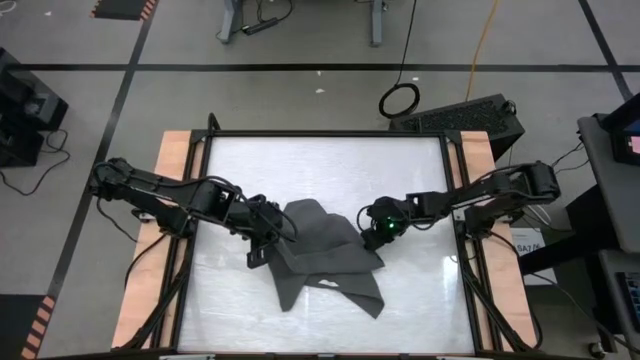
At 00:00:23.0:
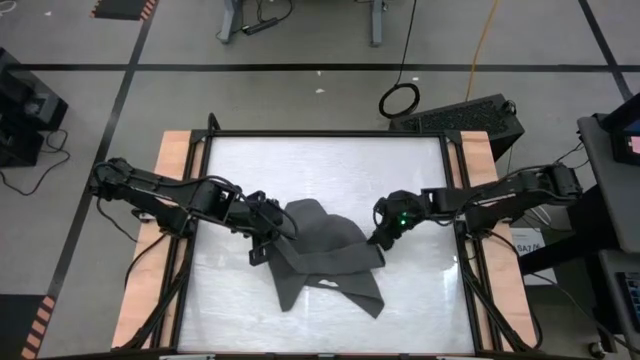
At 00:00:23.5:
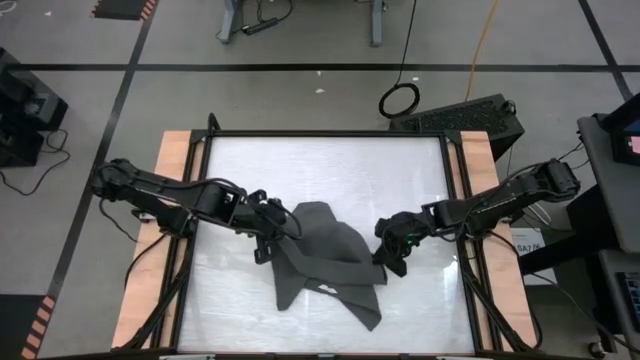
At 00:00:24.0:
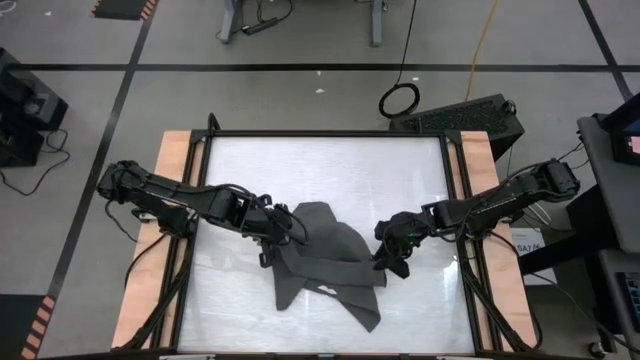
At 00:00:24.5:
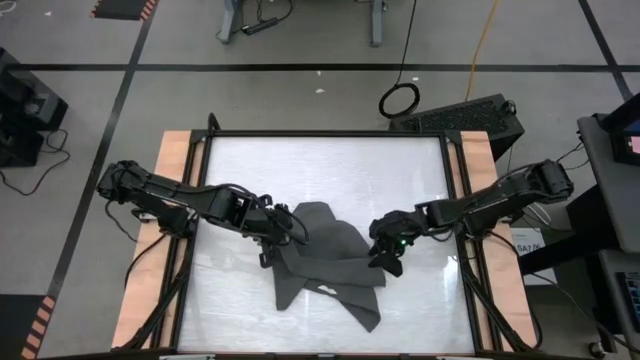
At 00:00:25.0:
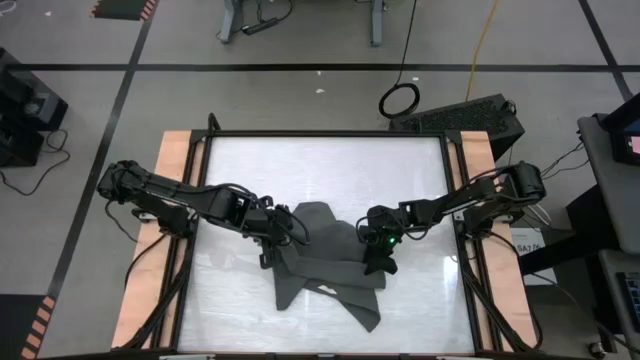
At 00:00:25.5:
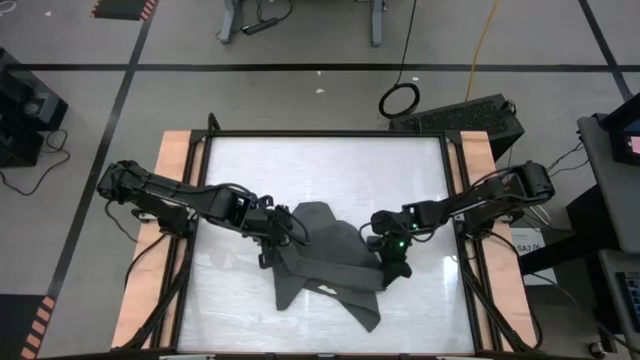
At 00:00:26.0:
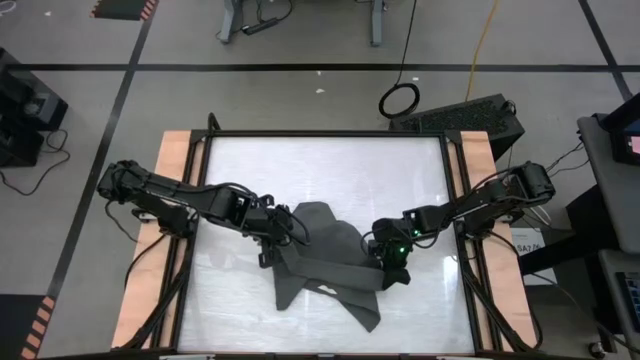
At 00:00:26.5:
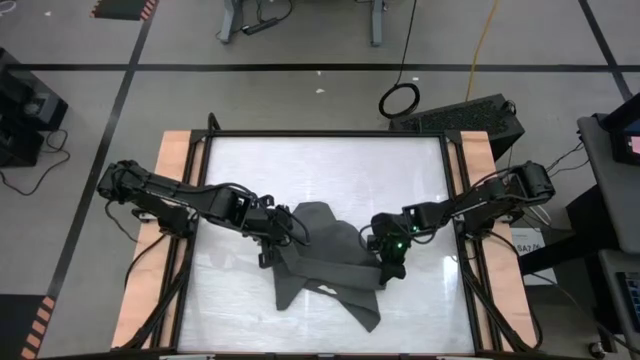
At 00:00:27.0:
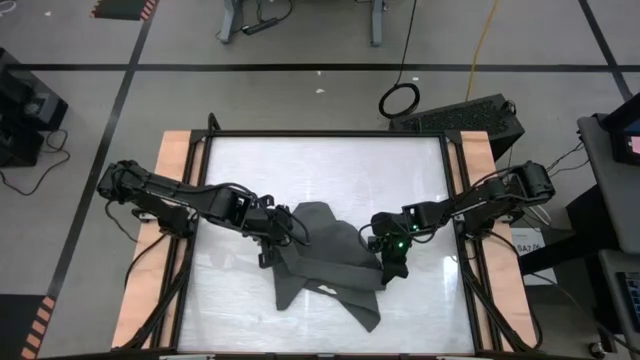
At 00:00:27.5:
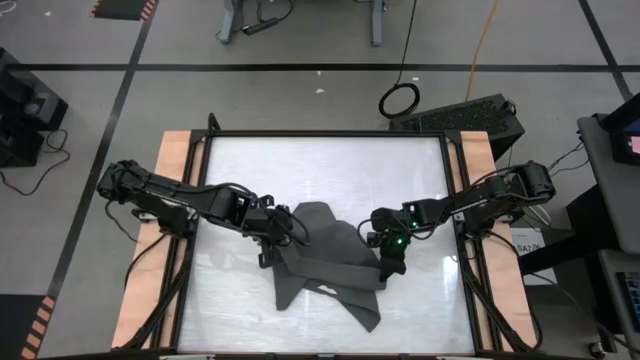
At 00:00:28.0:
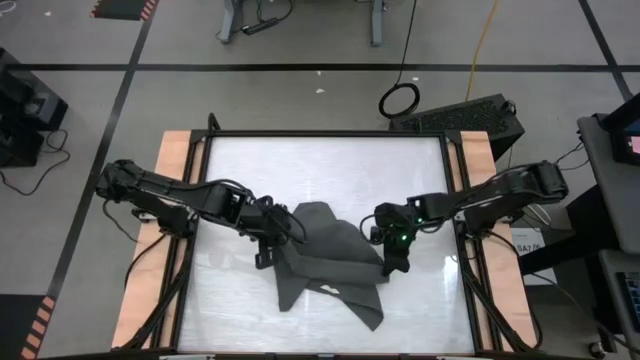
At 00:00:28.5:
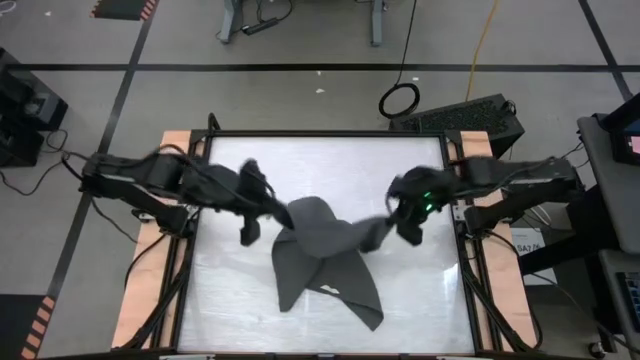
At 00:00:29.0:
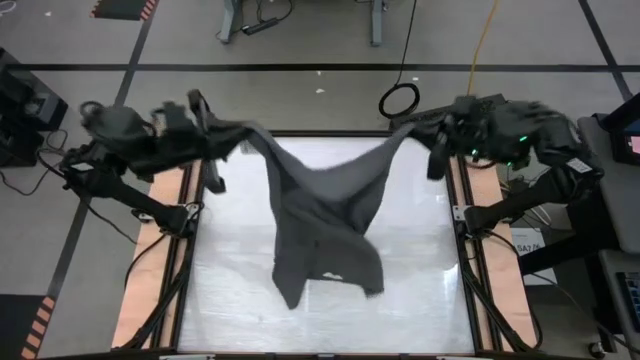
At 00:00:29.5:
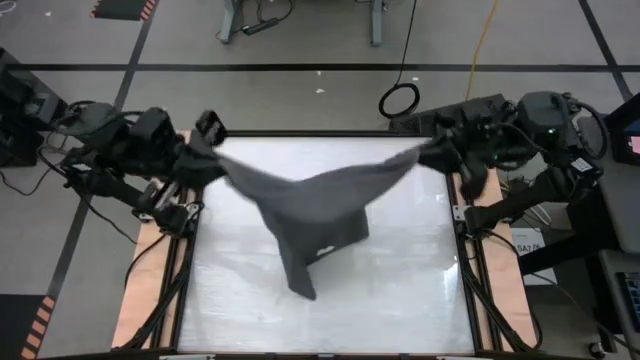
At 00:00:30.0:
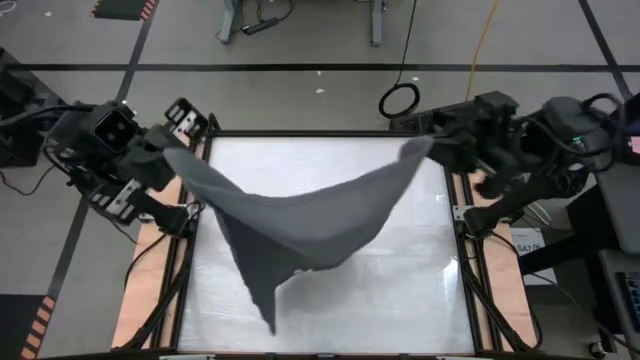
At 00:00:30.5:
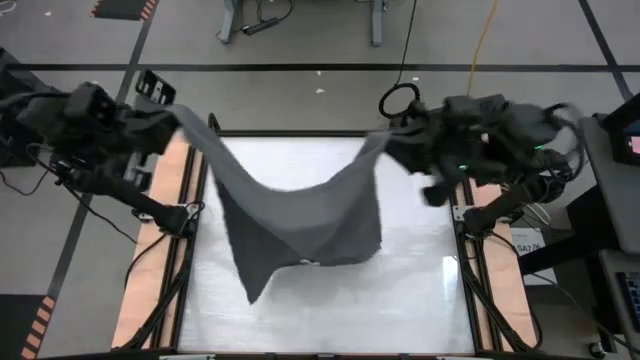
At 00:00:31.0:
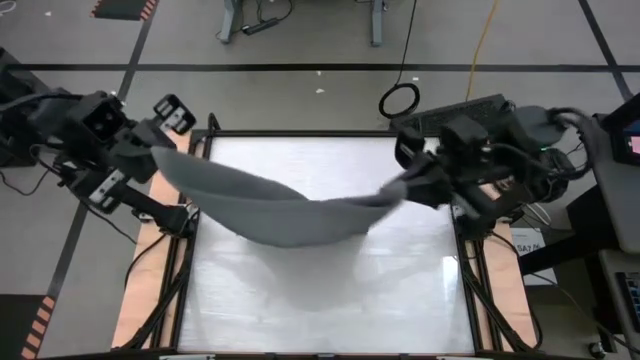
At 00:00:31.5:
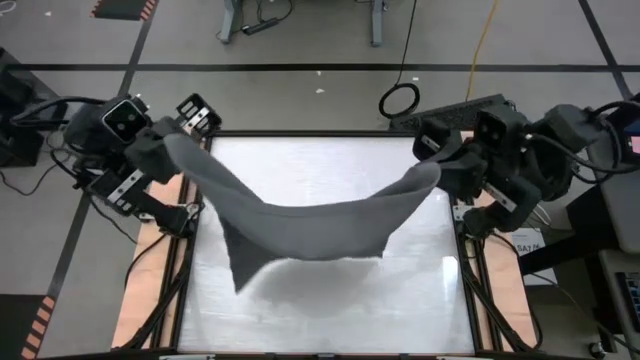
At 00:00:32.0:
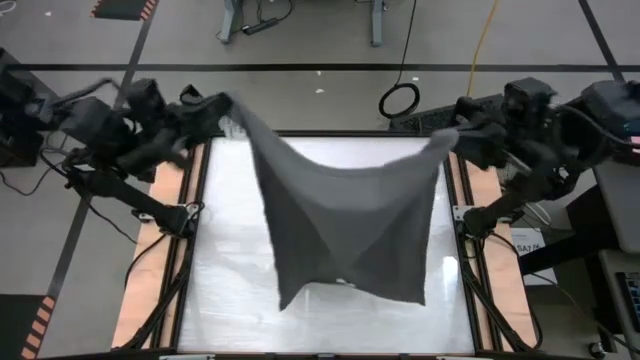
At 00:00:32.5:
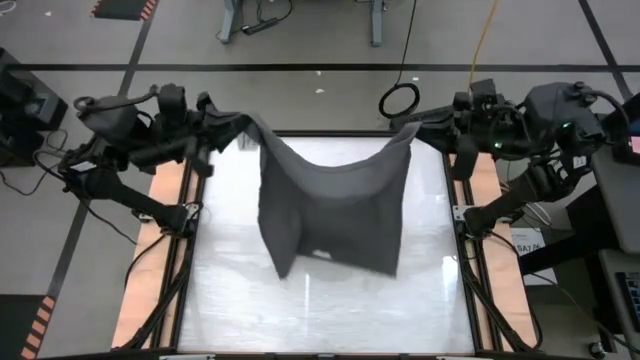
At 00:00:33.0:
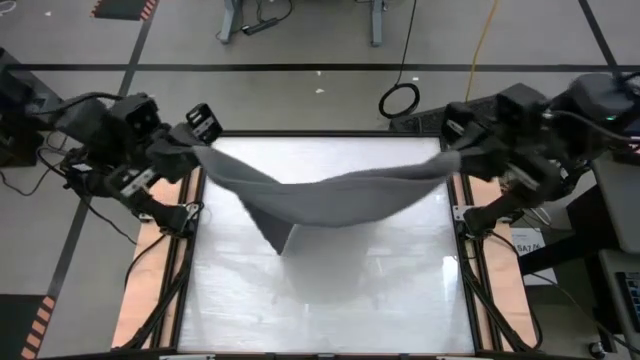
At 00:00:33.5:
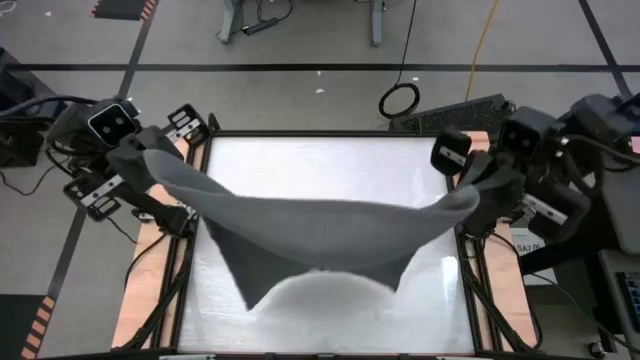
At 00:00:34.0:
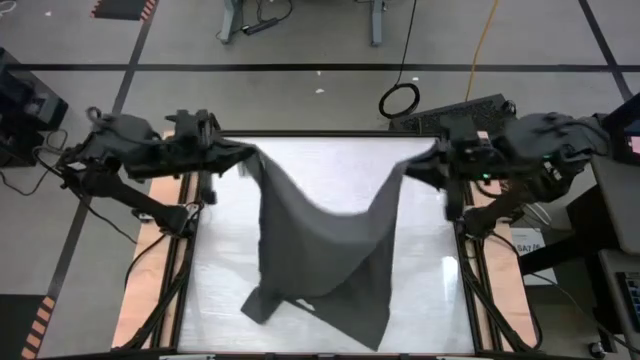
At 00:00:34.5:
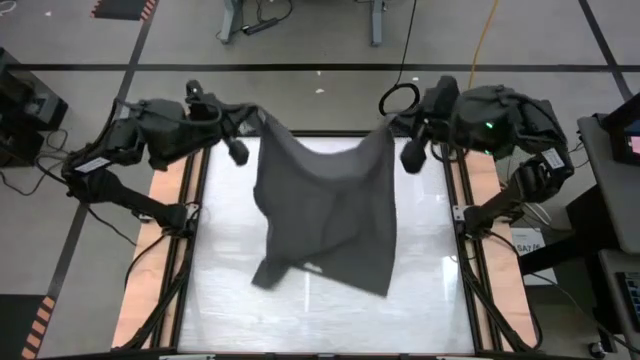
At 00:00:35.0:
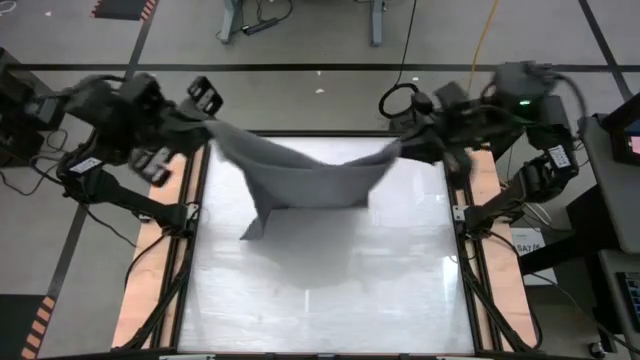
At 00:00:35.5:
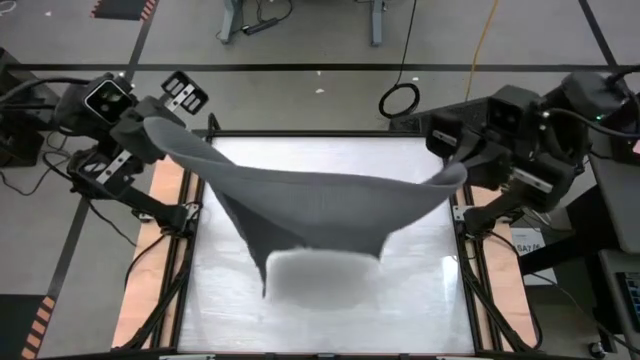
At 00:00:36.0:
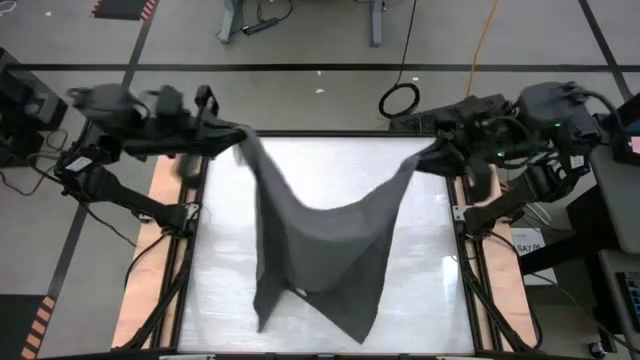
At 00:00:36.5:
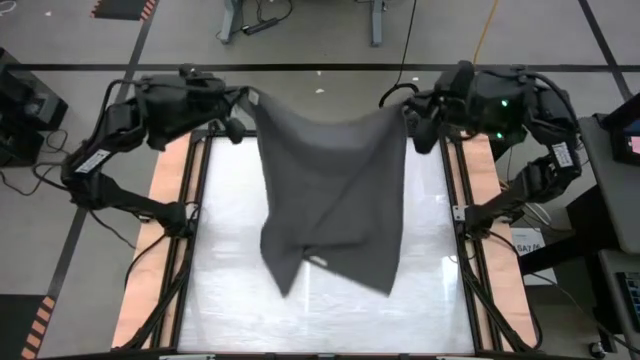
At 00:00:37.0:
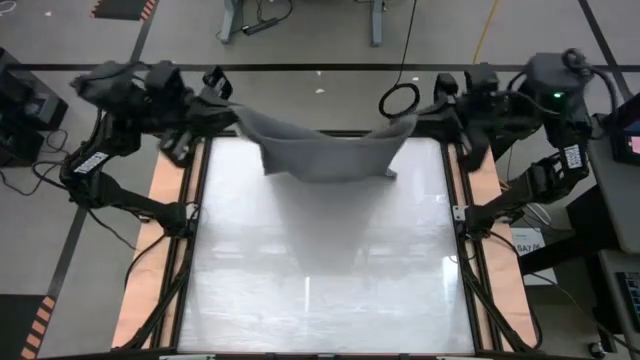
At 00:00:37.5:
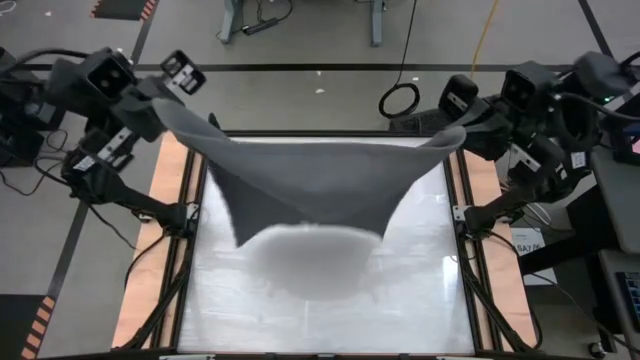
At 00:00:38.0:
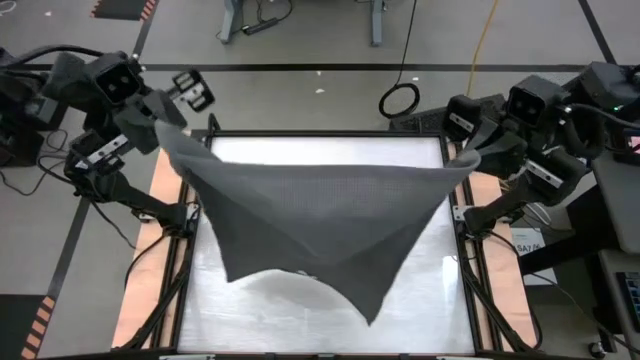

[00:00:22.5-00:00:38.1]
Task: Roll towel into tight, uniform cylinder
Roll the gray towel
